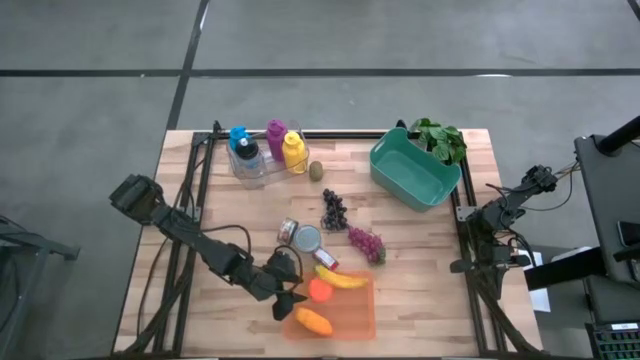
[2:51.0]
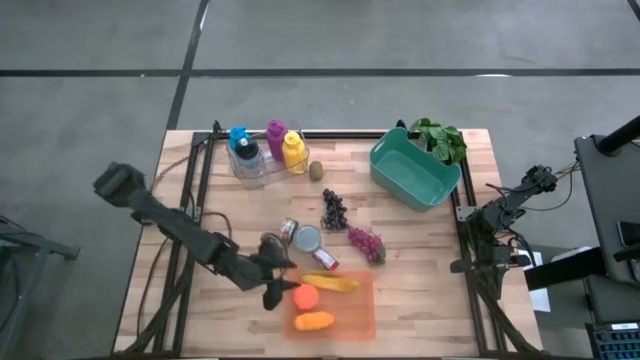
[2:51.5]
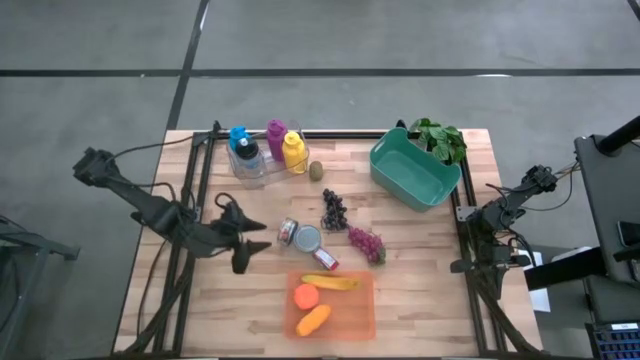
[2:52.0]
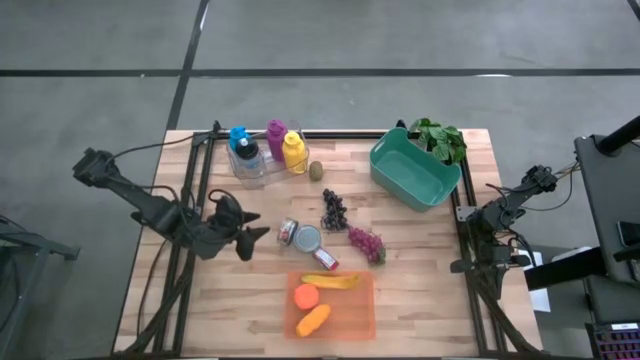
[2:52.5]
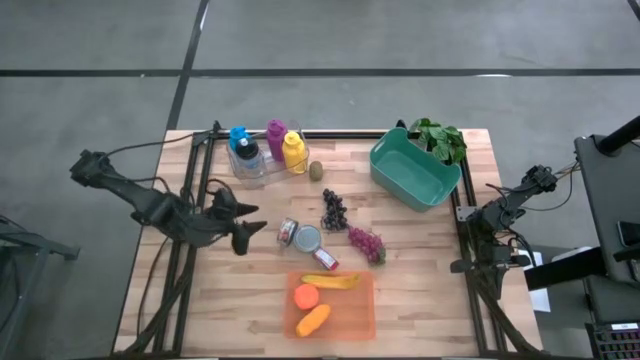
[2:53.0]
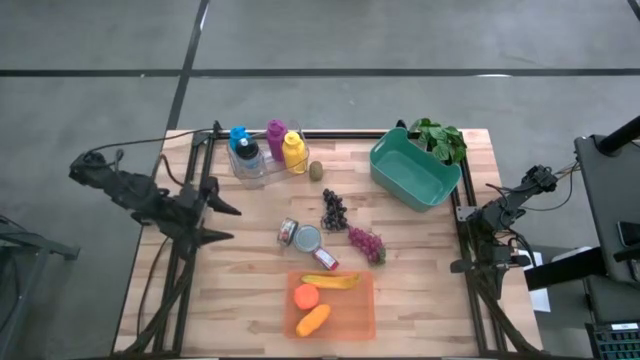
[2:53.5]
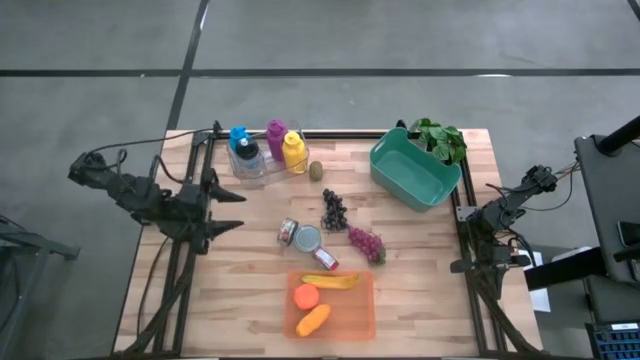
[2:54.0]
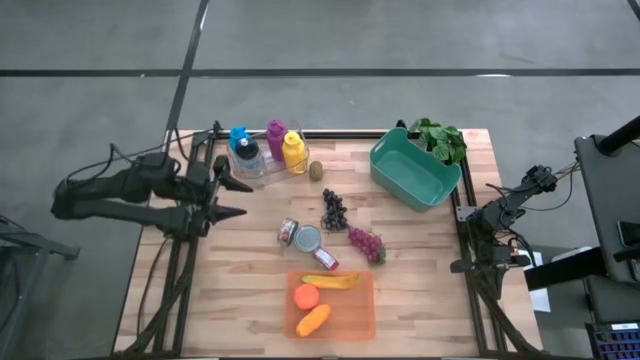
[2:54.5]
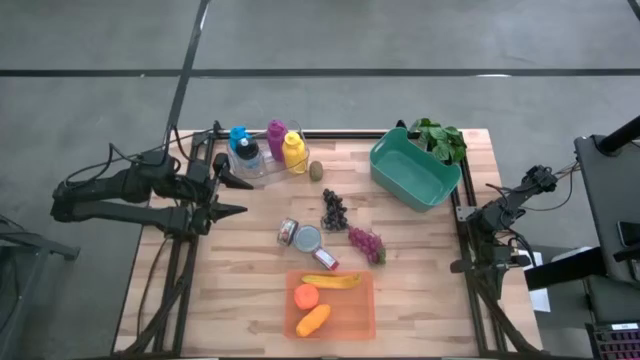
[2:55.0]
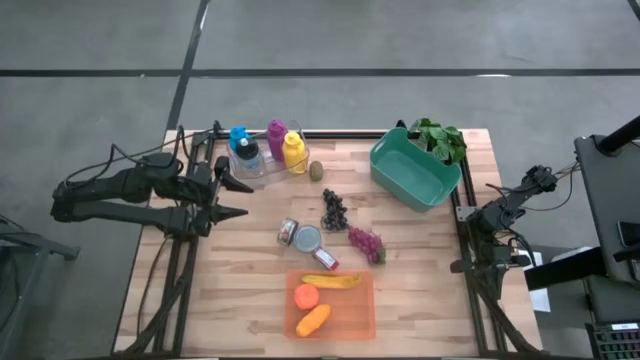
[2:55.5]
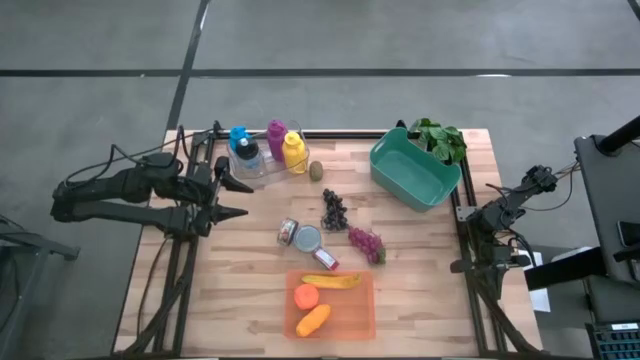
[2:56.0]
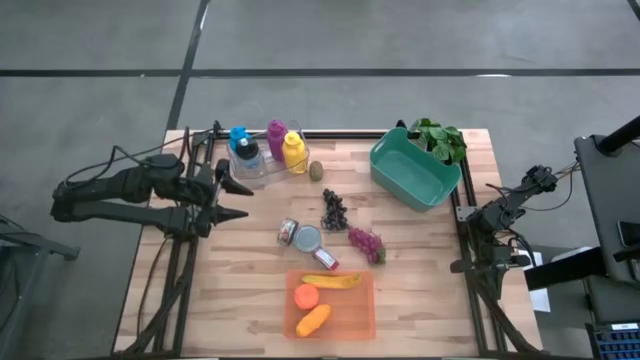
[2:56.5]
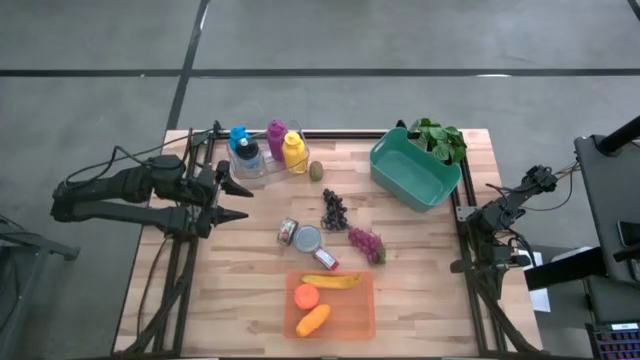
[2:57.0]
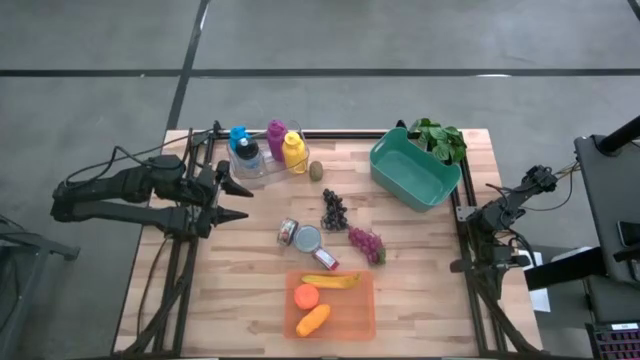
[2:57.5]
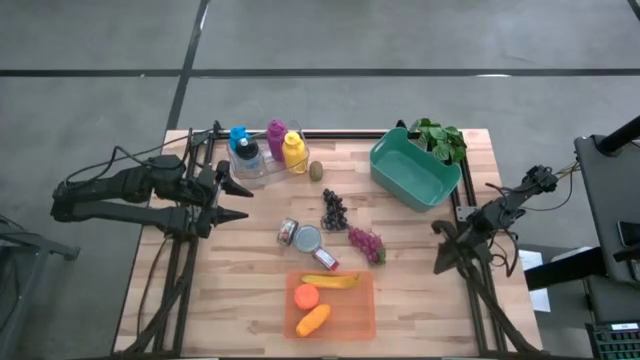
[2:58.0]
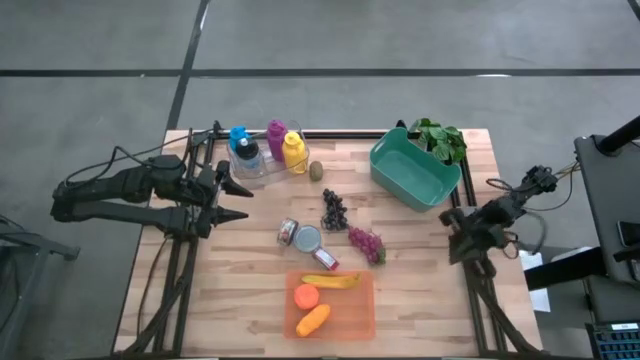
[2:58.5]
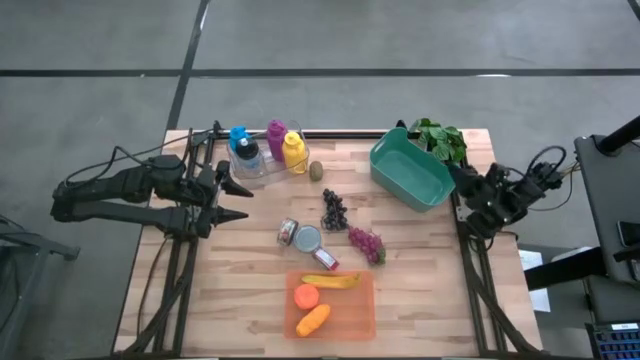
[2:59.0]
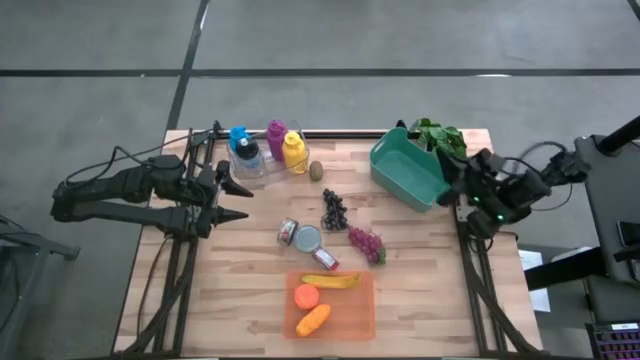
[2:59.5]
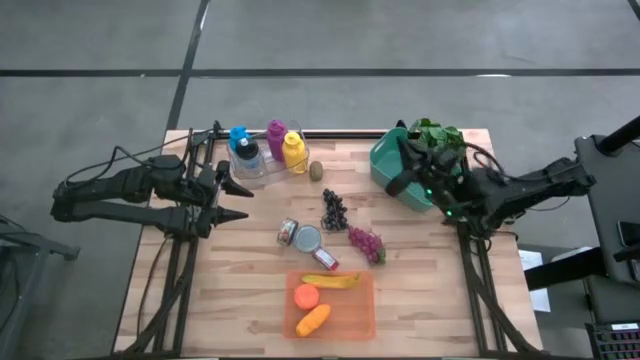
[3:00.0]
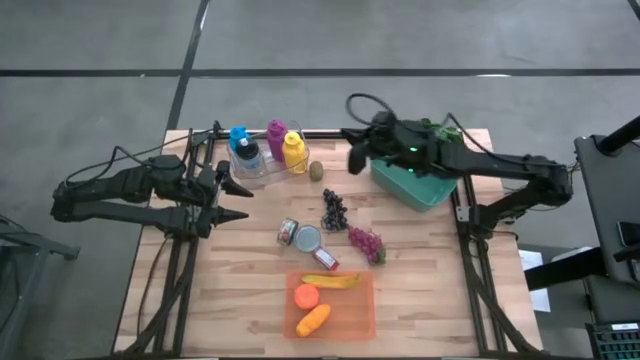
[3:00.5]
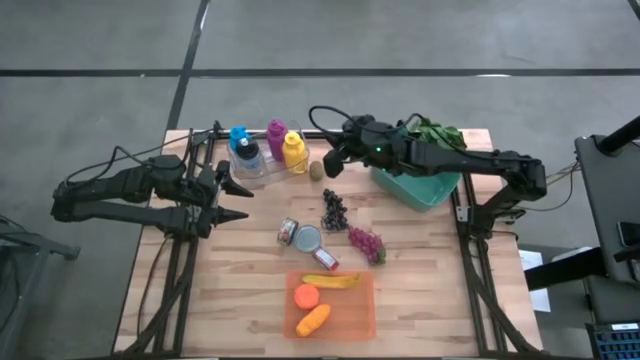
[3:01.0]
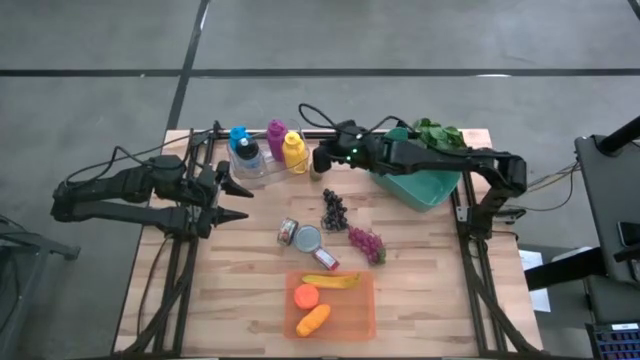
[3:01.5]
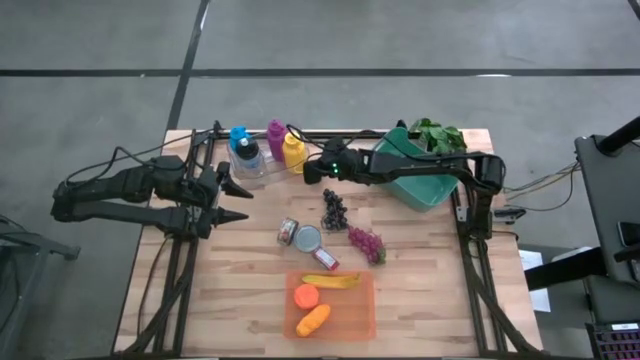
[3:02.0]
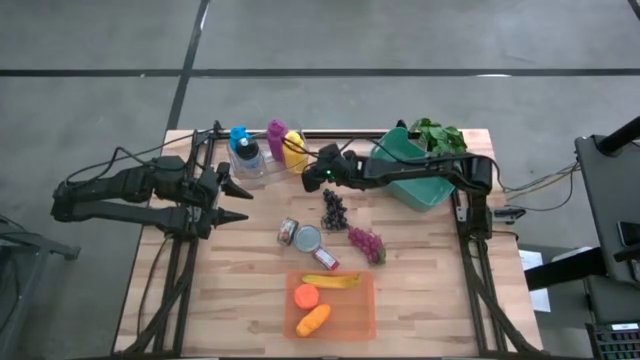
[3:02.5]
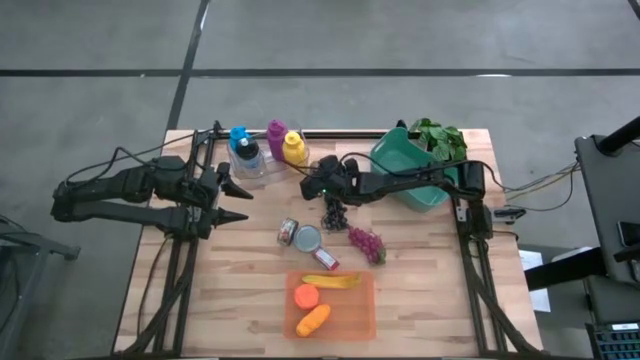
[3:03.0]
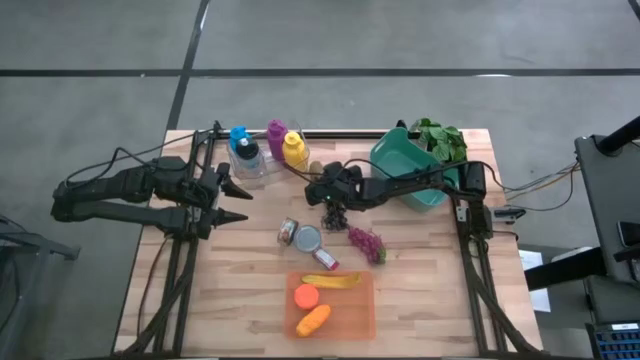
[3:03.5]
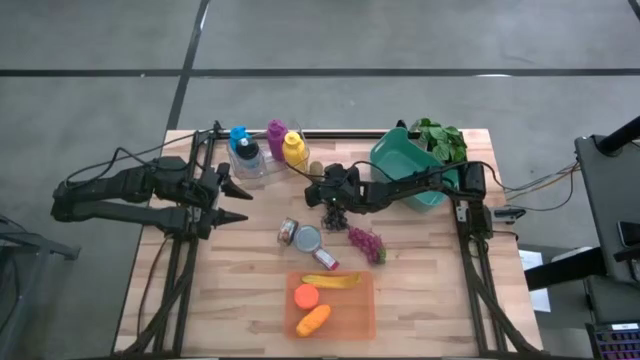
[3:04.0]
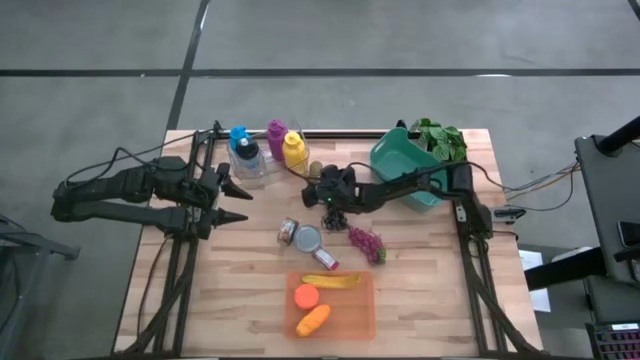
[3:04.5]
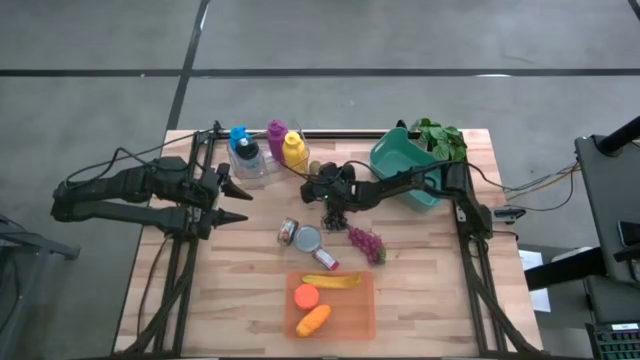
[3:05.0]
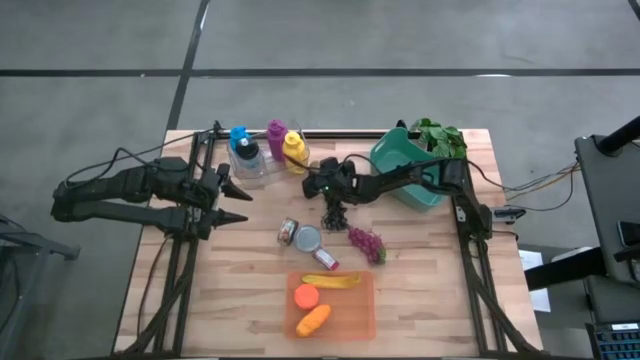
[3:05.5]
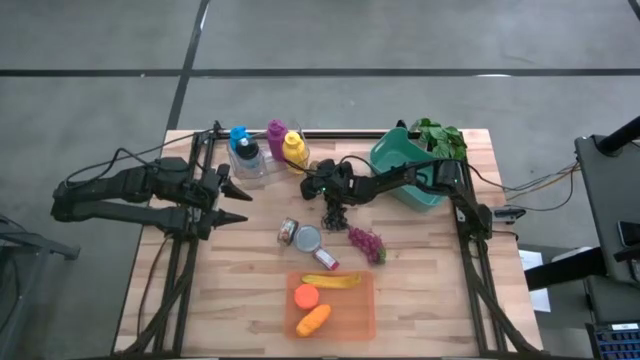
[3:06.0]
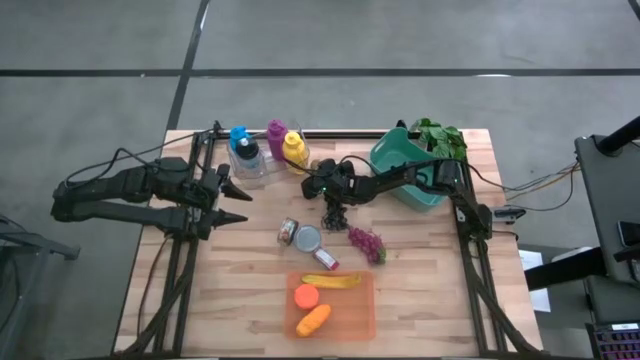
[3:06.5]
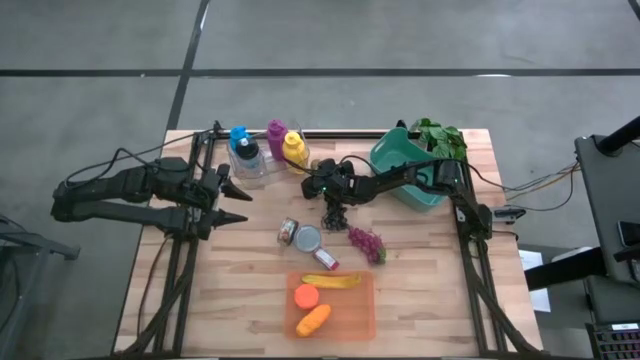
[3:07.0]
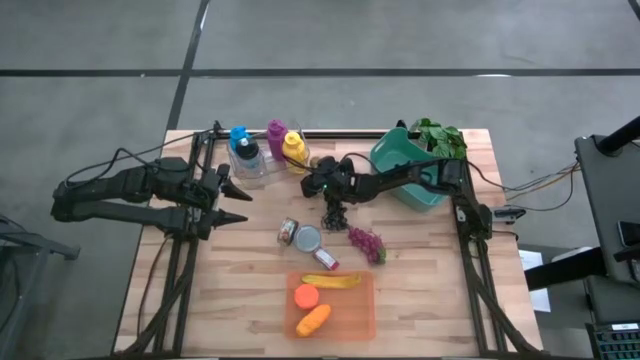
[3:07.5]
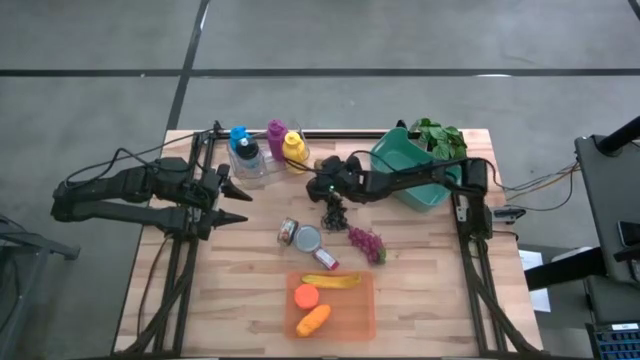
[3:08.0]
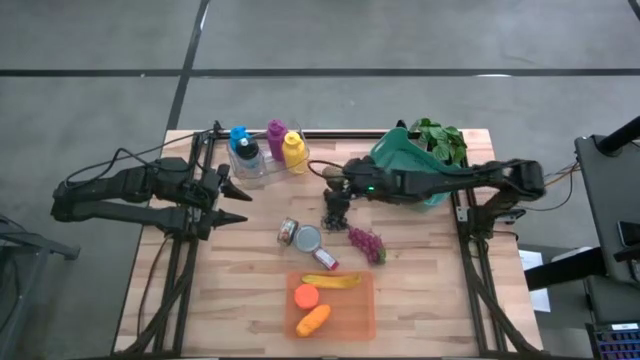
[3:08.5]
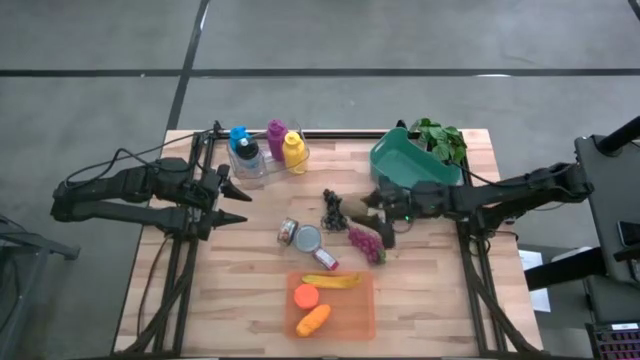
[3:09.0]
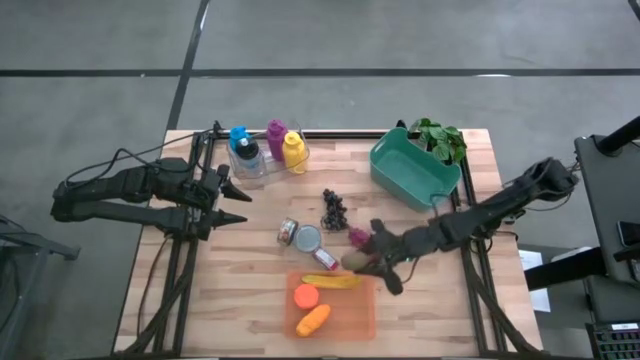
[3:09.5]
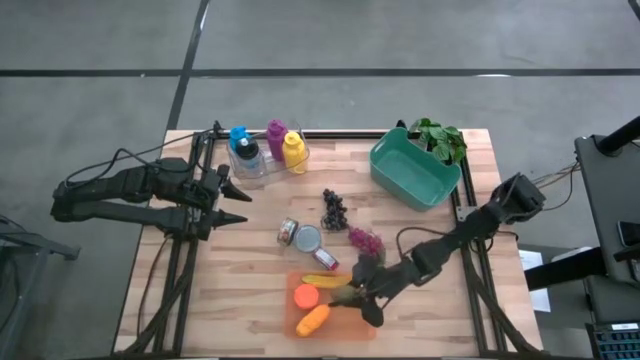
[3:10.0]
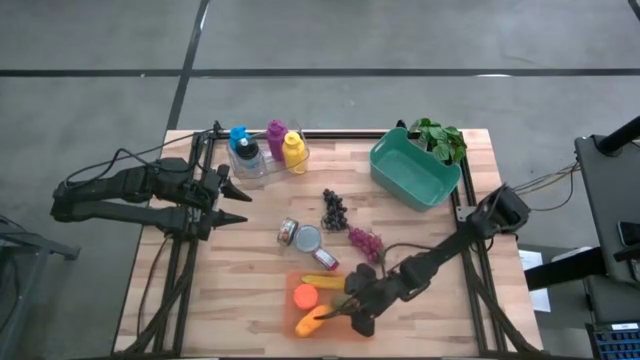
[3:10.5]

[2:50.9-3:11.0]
Task: Pick & Place Food Item
Put the brown kiwi into the orange bin
